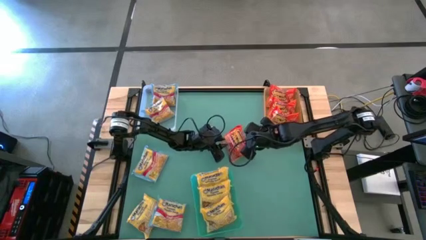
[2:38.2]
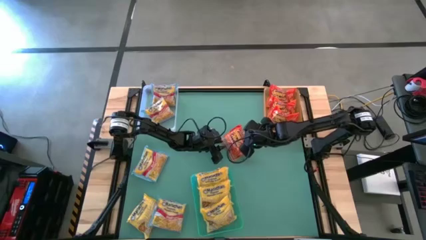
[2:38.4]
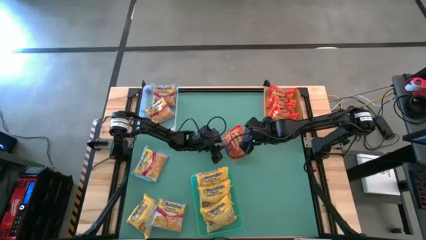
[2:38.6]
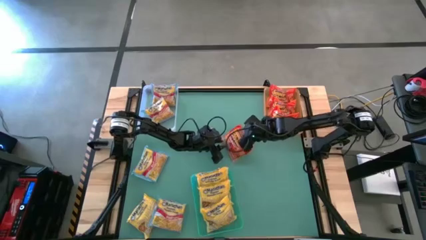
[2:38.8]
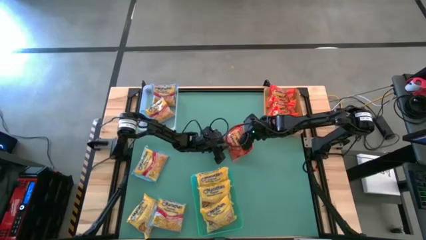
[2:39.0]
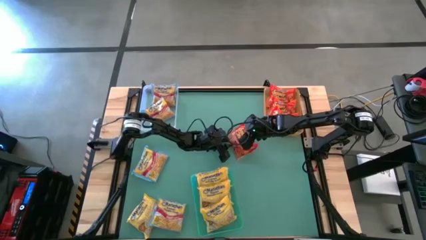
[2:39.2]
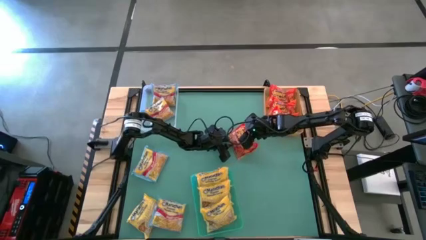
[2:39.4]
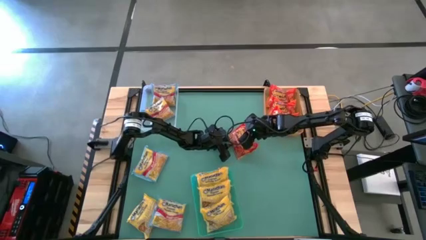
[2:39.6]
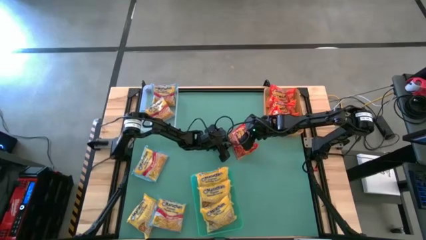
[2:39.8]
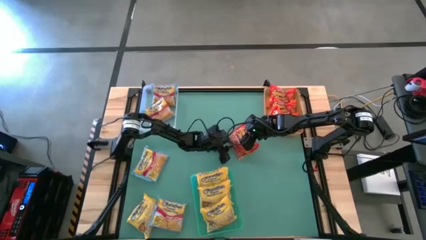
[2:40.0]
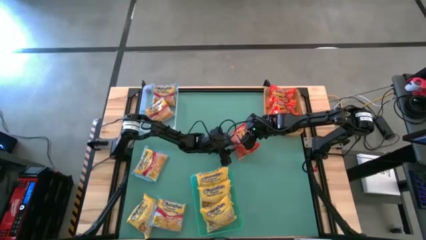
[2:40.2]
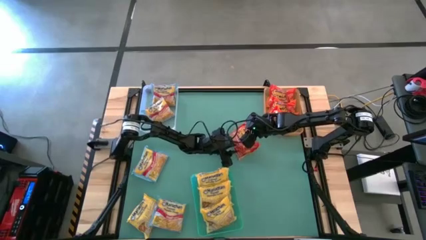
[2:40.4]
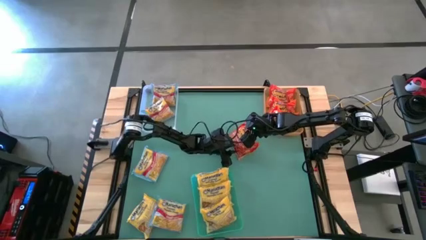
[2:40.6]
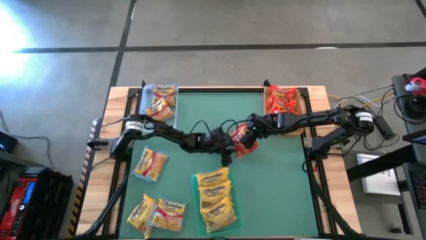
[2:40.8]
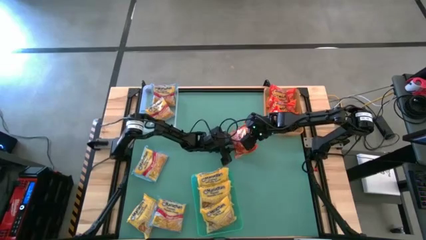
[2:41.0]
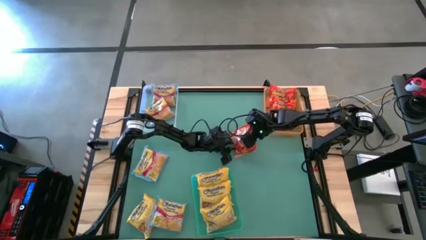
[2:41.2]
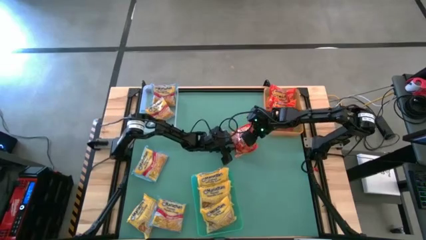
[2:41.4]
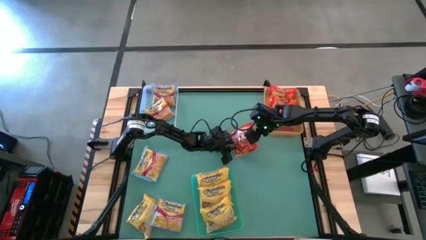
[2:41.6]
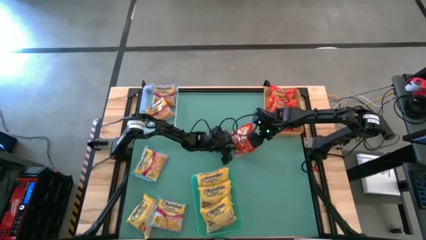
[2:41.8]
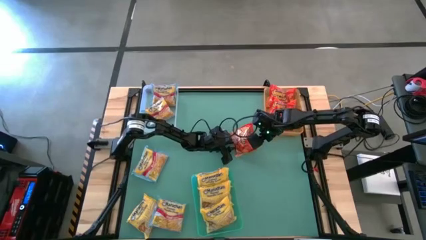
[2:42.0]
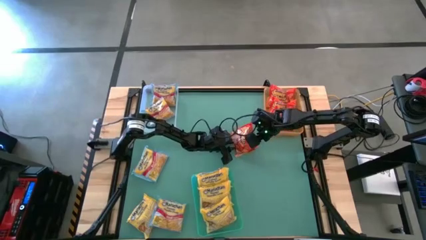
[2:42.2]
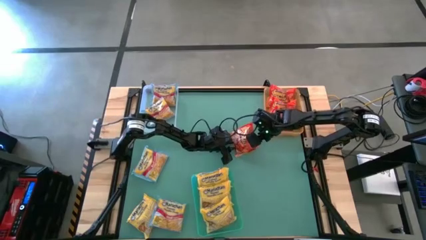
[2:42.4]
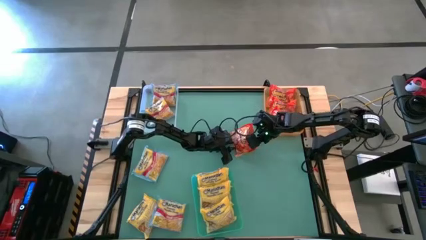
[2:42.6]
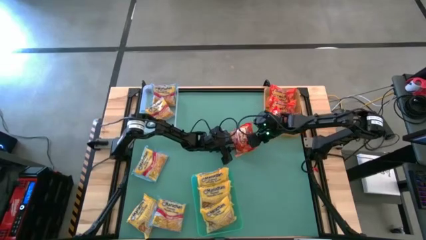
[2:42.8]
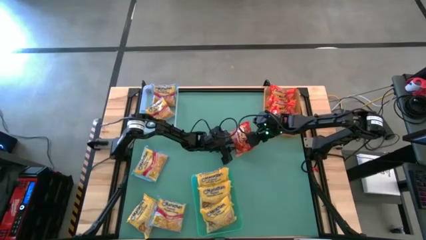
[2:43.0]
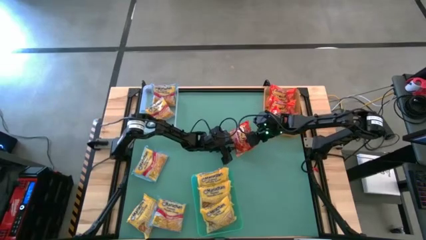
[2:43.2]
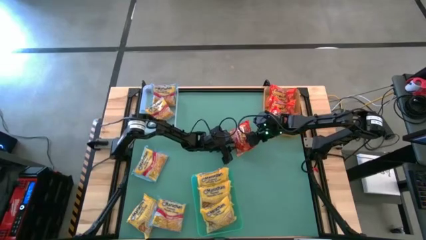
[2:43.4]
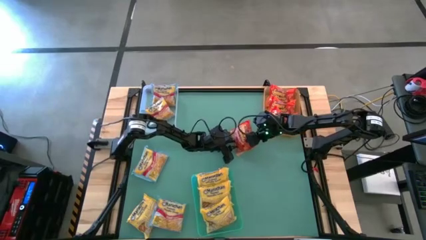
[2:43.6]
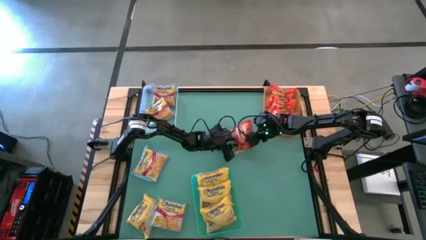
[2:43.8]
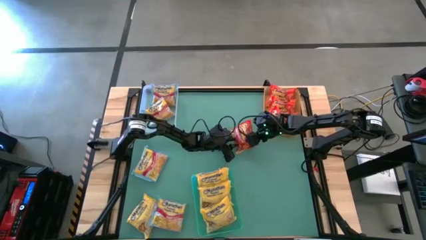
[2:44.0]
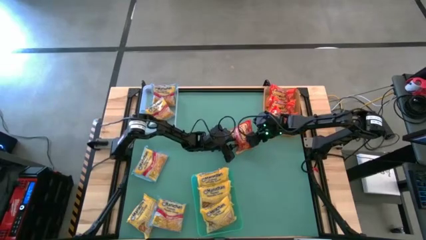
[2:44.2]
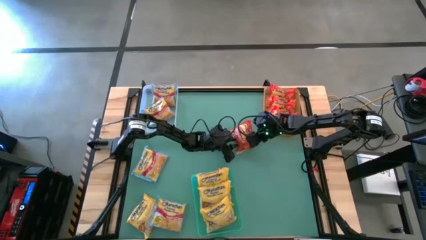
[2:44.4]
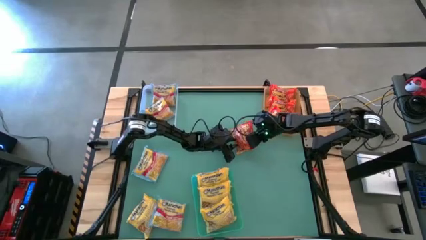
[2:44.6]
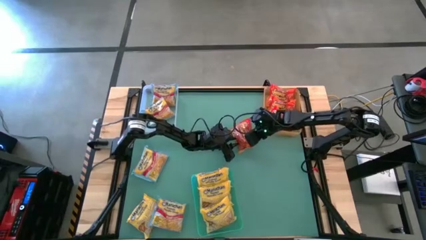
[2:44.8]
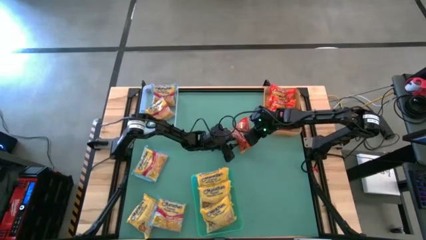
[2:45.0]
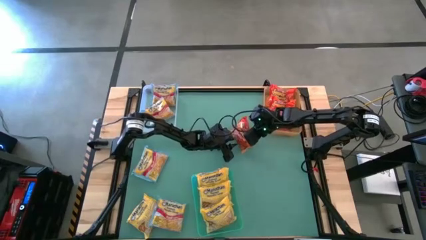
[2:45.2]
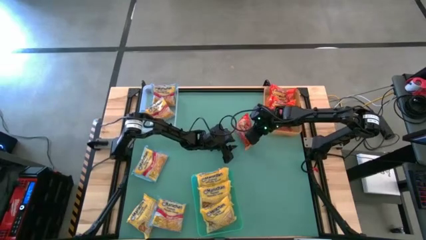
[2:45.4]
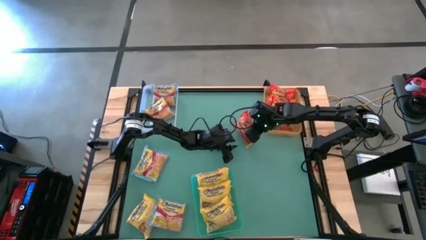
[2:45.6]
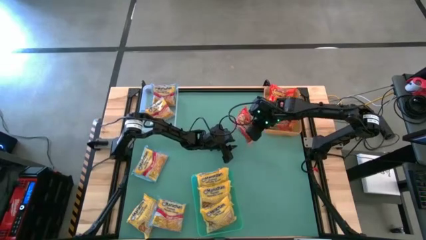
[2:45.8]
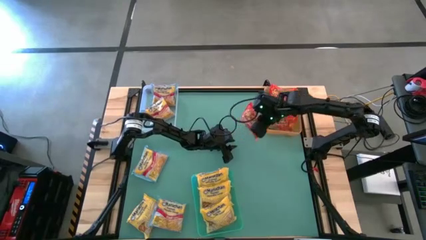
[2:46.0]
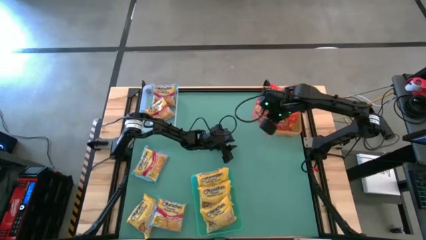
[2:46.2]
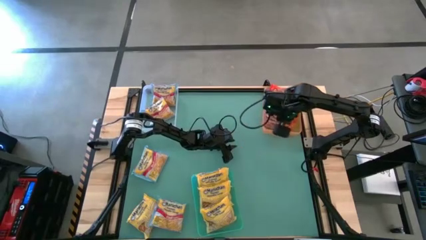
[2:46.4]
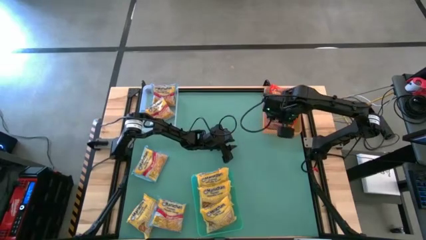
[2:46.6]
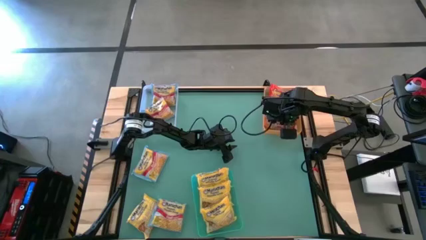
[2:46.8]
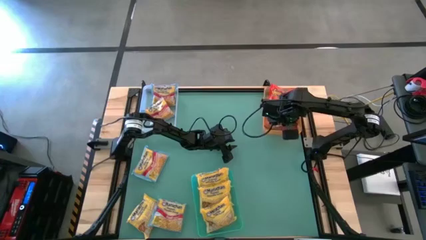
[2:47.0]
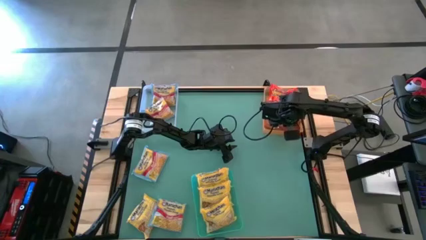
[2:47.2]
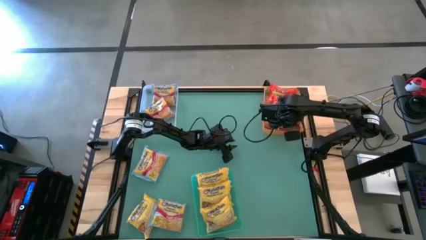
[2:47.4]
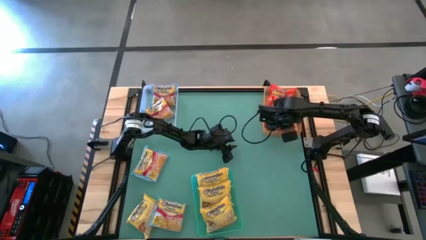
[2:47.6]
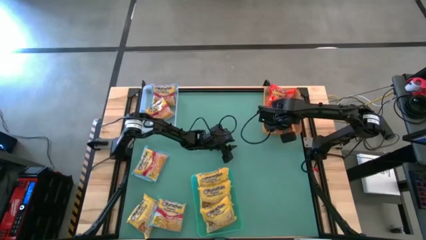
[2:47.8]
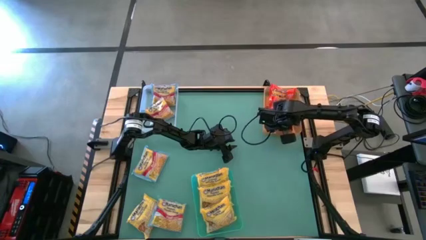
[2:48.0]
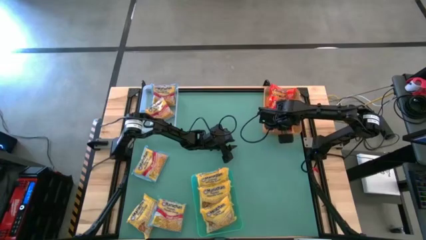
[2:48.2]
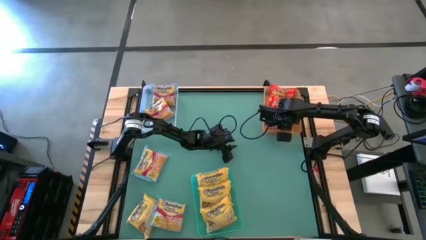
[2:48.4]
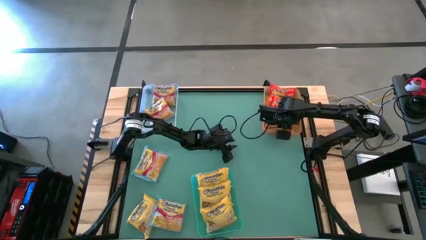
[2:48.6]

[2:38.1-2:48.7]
Task: Sort Maruchan noodles
Put the red noodle pack into the orange bin
